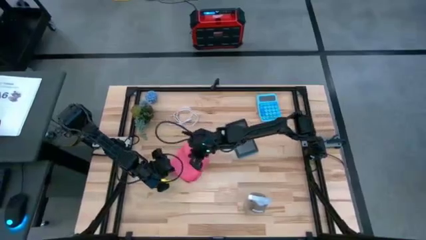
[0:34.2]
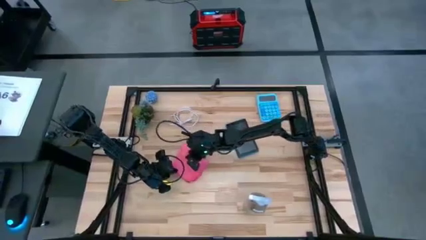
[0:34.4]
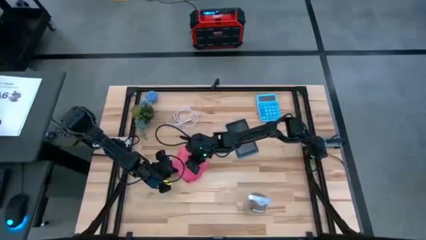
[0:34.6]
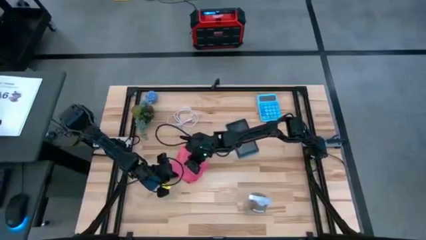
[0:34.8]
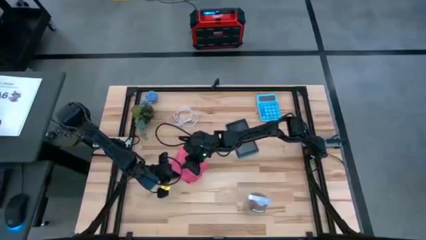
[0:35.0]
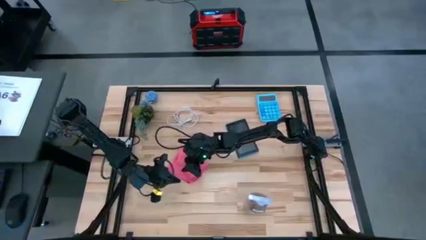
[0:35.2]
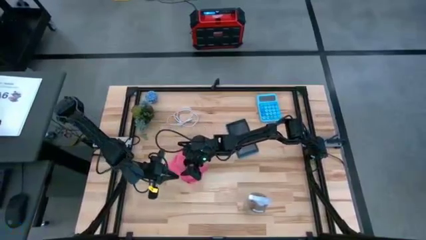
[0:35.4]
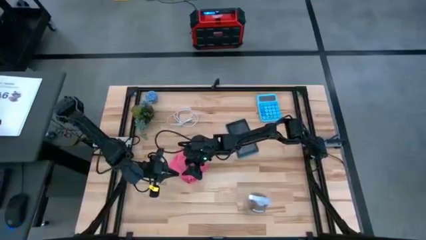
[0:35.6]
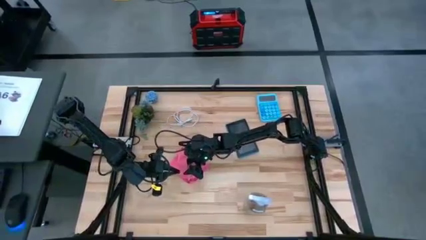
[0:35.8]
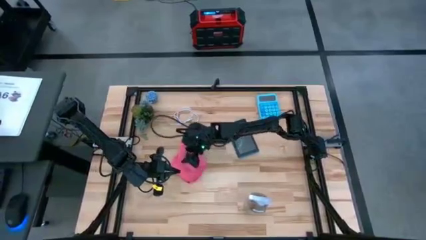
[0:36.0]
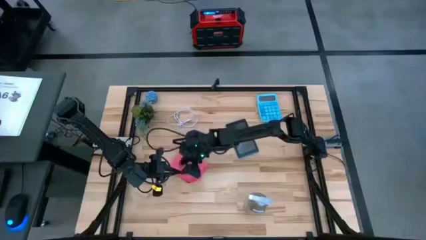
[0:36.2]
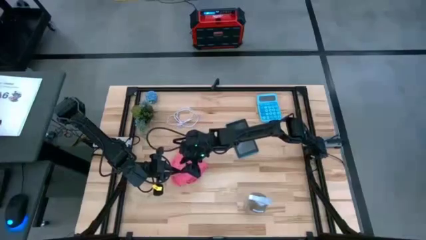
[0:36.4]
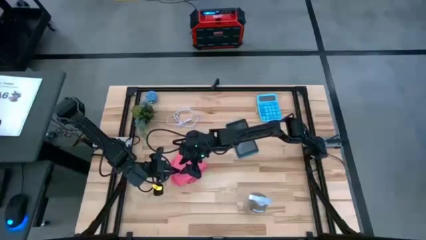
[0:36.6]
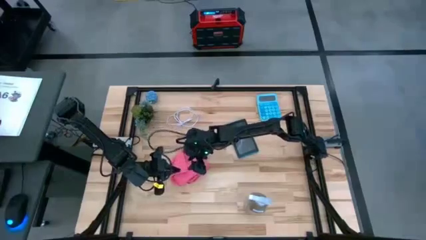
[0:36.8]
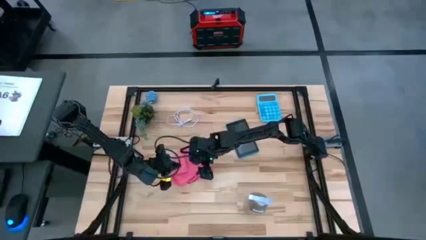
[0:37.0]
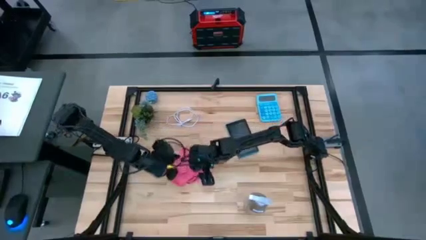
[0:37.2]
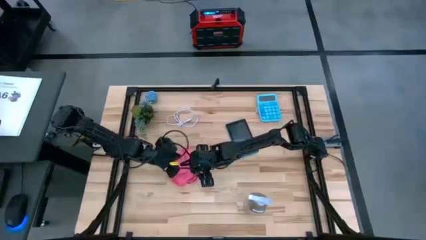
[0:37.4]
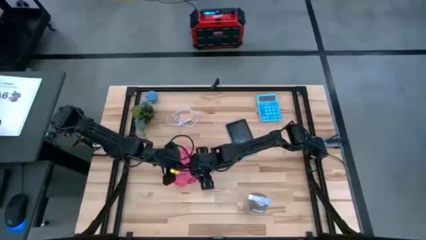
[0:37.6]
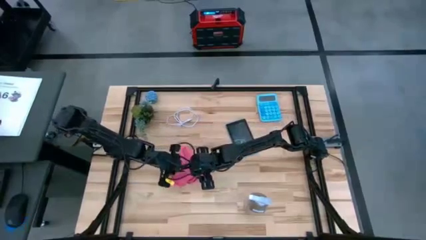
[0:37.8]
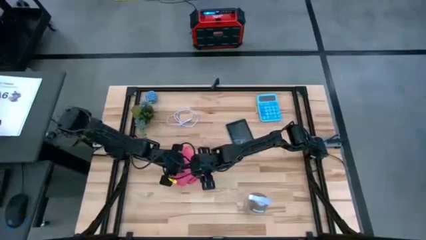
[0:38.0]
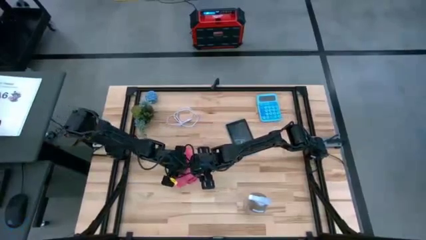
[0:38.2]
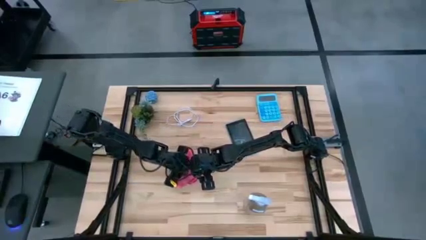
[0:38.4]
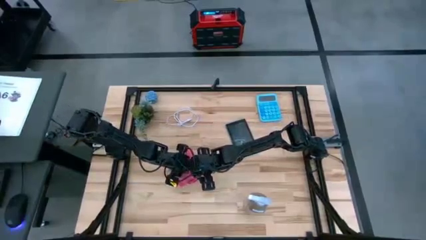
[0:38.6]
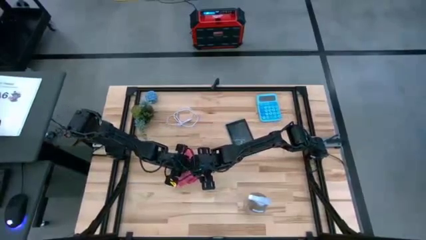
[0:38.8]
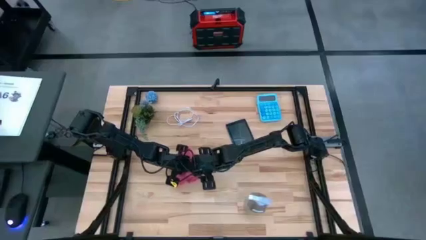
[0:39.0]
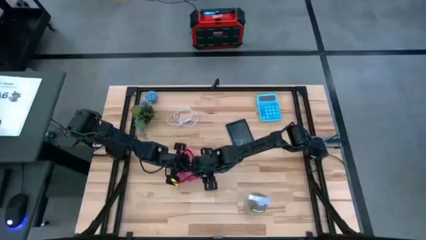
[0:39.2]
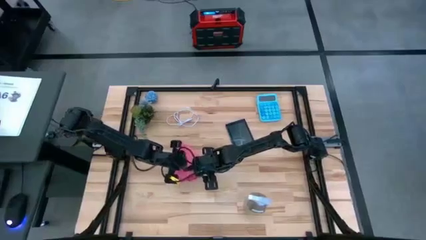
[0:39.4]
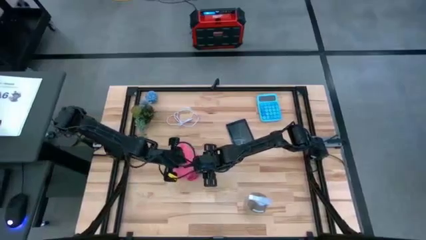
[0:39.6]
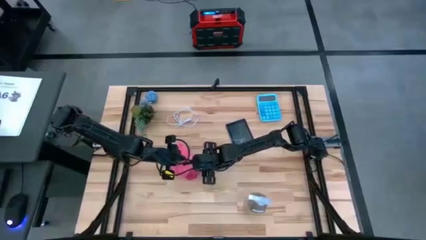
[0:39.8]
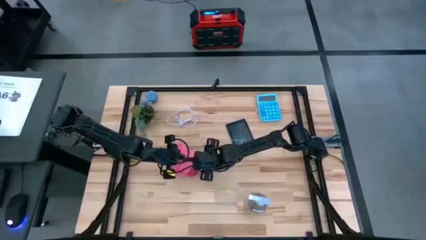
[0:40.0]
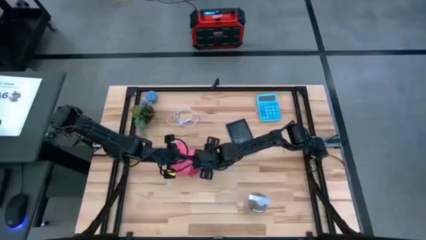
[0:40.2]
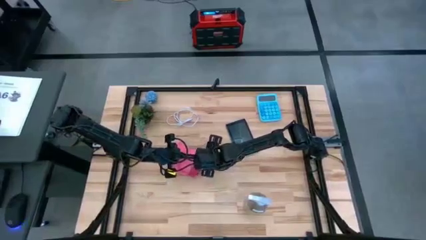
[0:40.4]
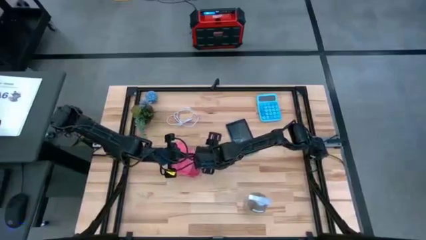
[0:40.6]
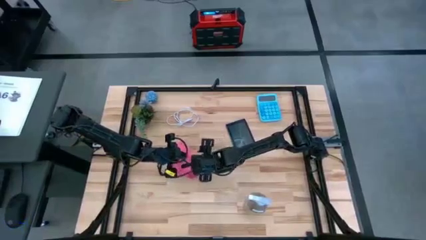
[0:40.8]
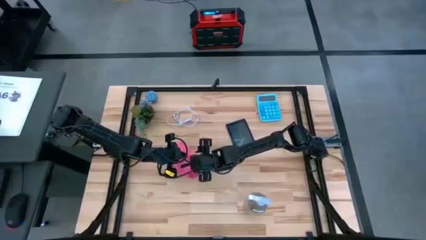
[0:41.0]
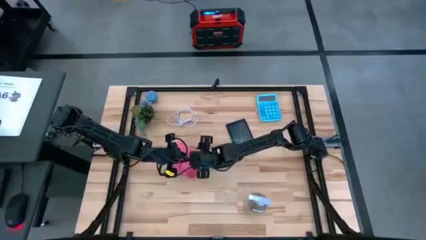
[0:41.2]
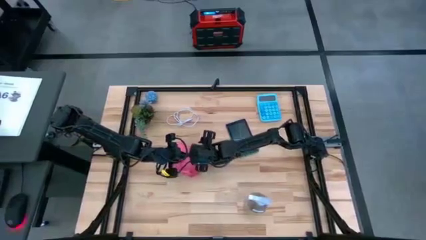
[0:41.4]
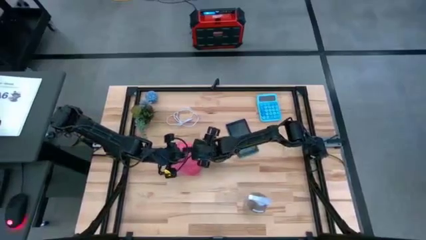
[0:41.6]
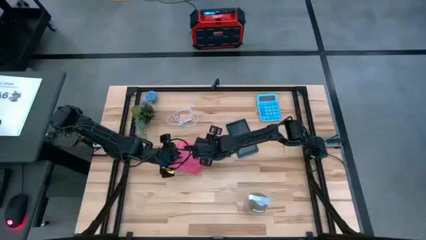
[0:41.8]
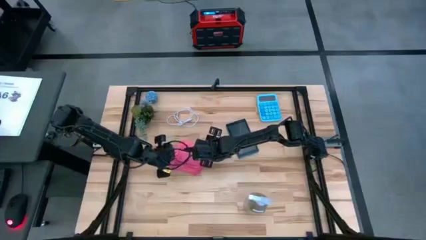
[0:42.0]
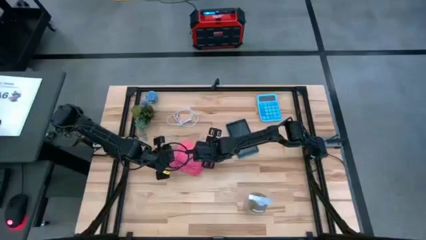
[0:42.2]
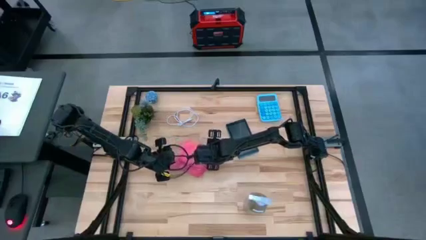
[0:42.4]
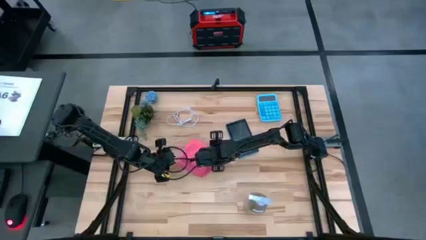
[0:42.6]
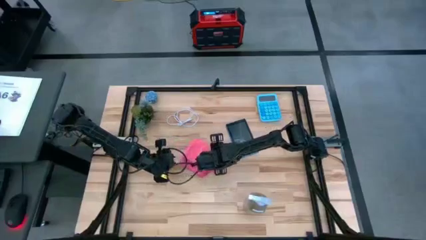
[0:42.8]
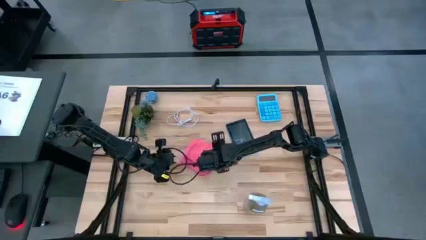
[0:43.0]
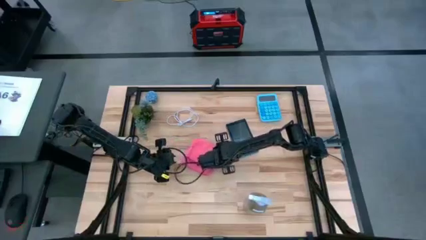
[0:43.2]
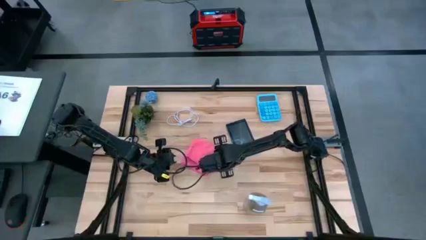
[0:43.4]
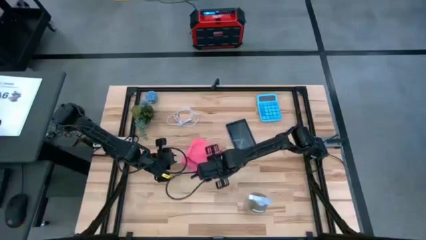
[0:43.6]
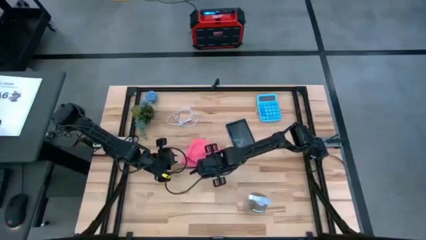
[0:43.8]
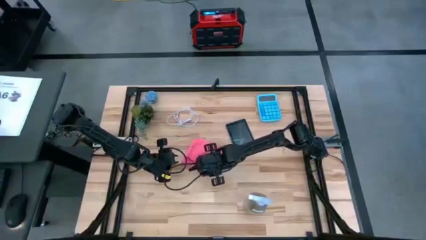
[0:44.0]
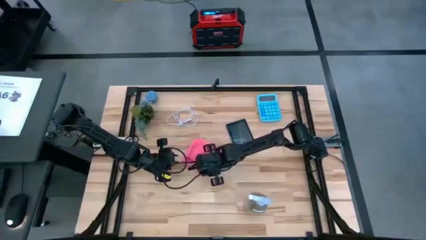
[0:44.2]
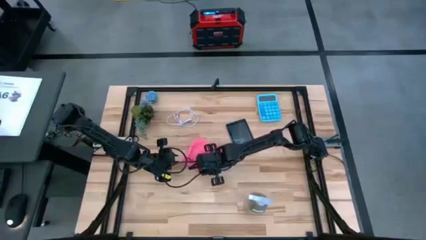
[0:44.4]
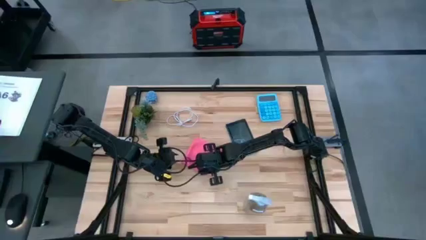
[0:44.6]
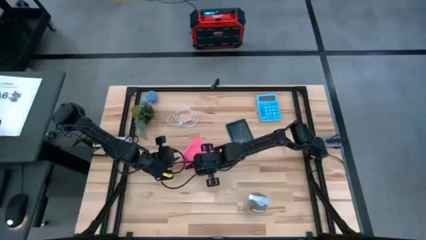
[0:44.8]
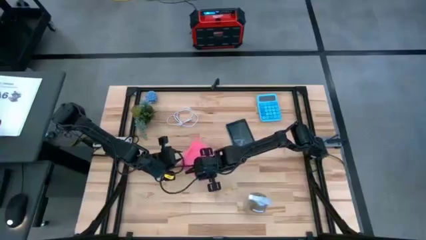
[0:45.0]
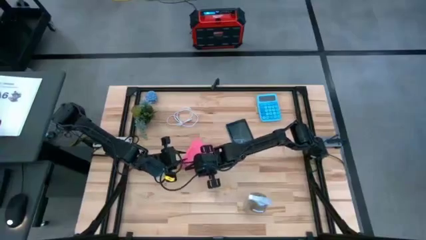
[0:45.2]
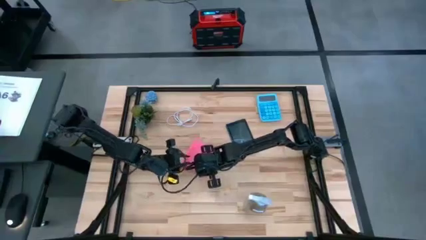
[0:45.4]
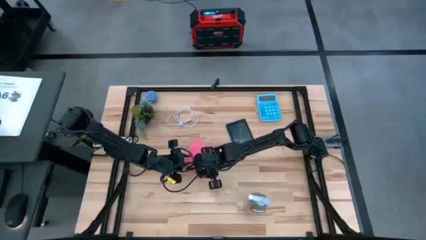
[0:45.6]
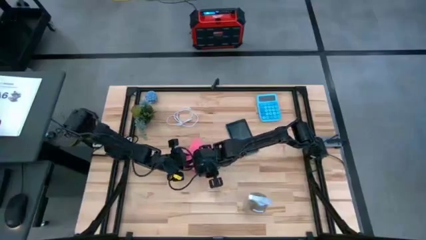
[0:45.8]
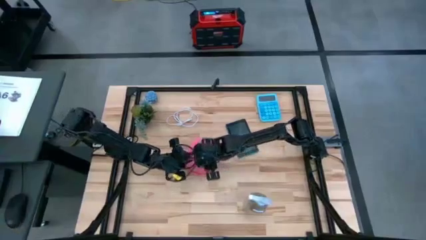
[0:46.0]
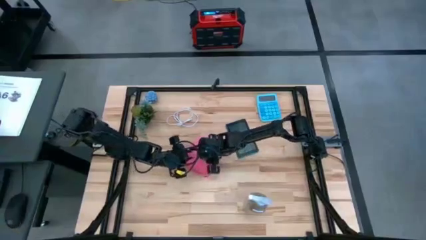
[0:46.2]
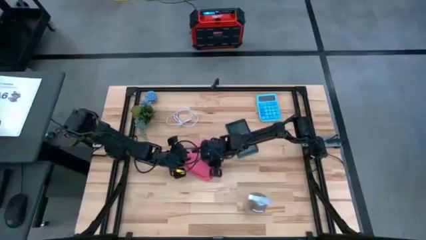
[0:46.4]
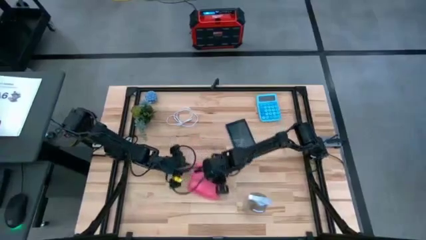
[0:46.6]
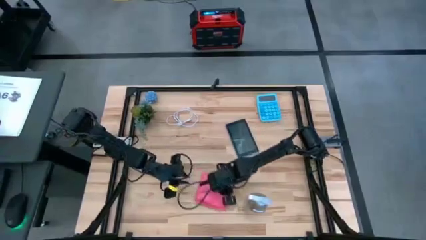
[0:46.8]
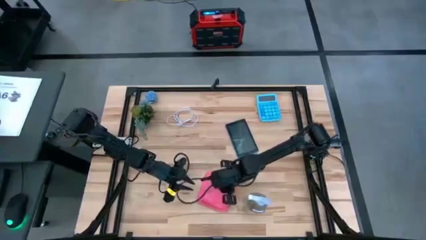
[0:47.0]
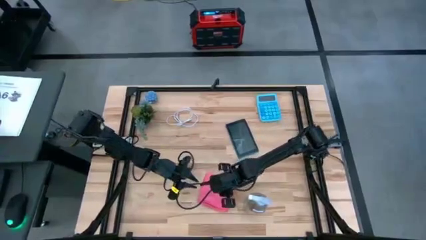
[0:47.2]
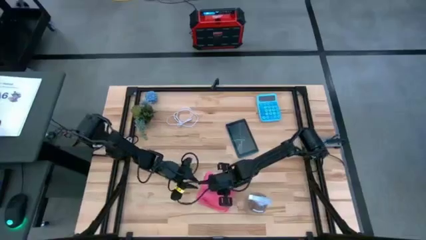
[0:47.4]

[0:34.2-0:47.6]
Task: Apply microfiber cloth
Fold the pink microfiber cloth
